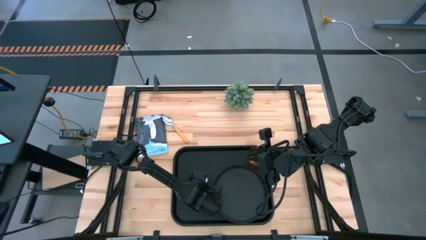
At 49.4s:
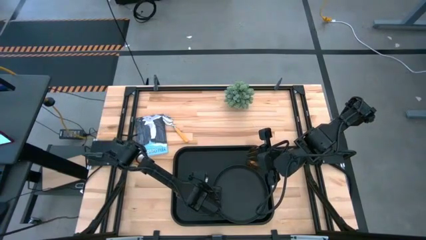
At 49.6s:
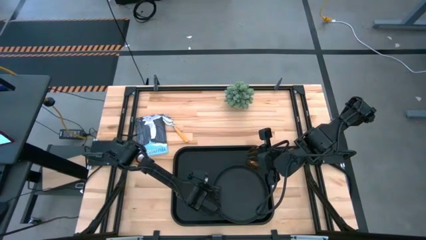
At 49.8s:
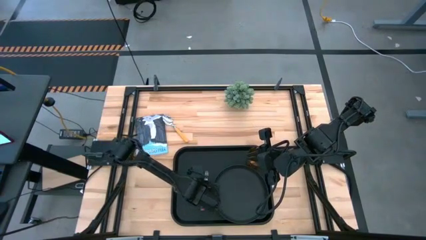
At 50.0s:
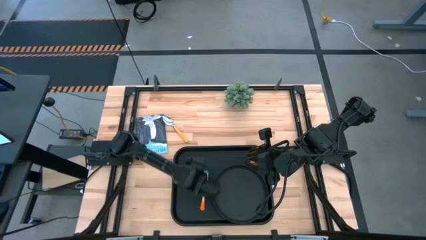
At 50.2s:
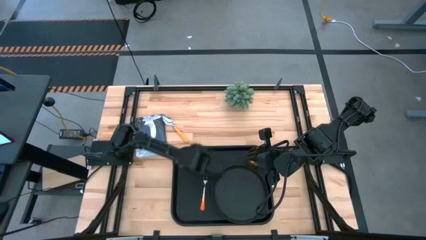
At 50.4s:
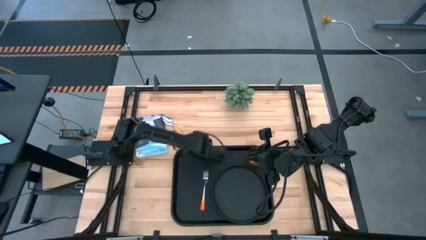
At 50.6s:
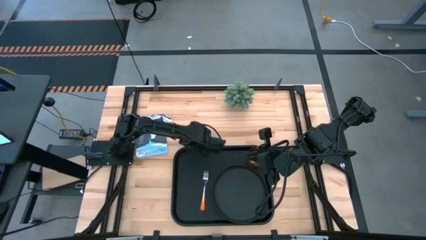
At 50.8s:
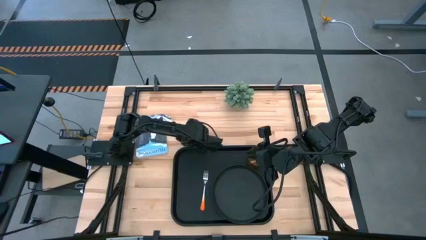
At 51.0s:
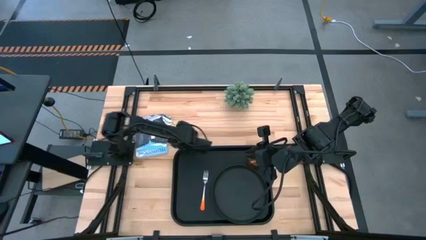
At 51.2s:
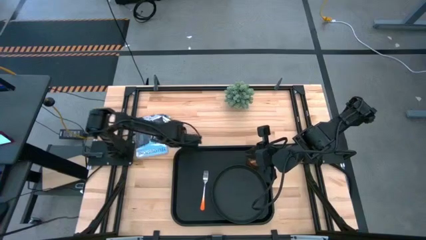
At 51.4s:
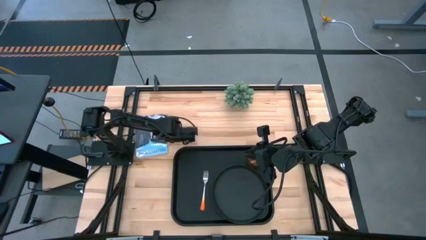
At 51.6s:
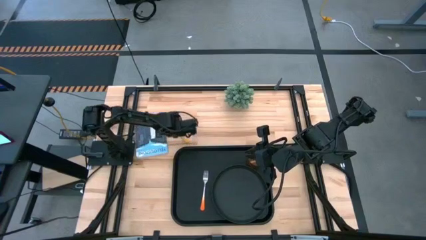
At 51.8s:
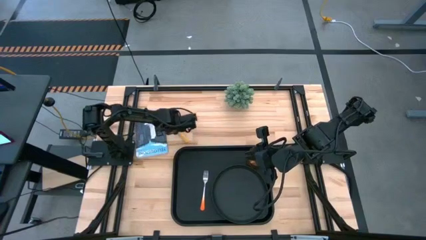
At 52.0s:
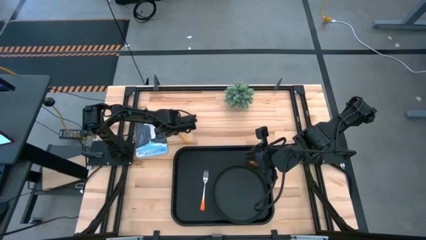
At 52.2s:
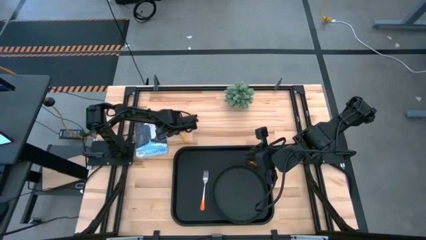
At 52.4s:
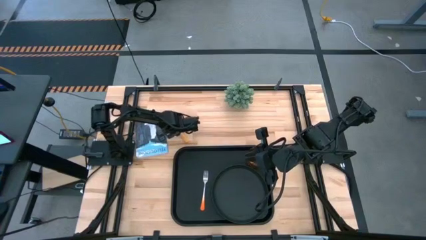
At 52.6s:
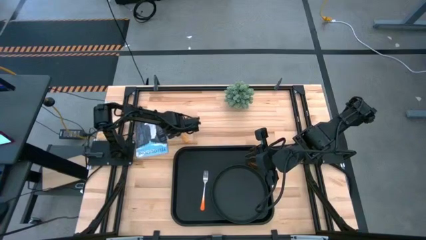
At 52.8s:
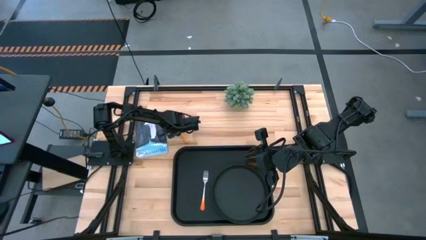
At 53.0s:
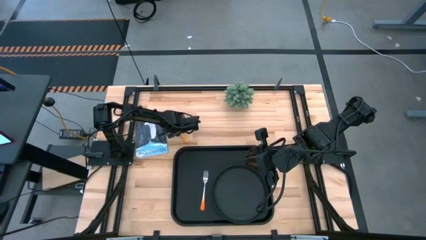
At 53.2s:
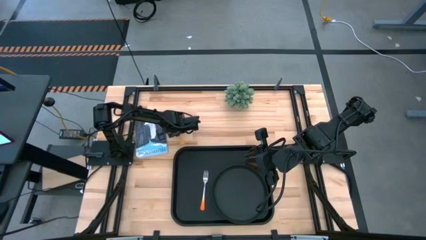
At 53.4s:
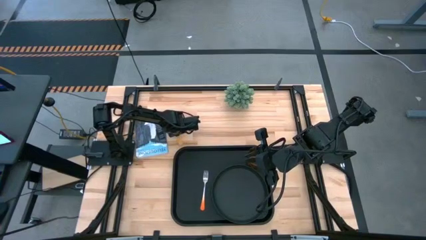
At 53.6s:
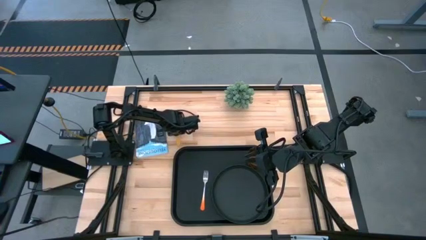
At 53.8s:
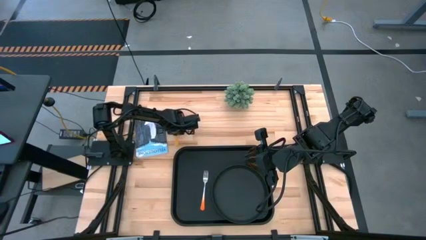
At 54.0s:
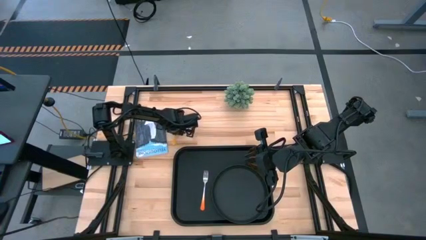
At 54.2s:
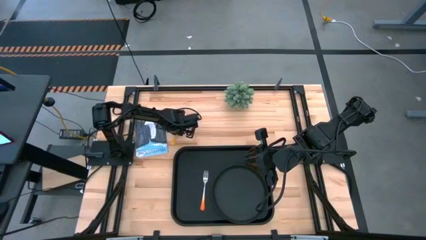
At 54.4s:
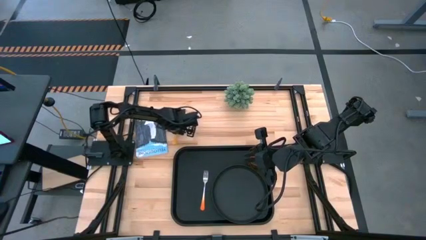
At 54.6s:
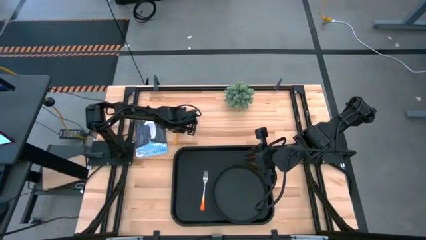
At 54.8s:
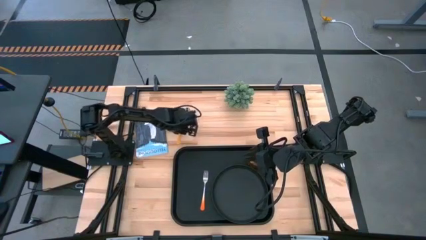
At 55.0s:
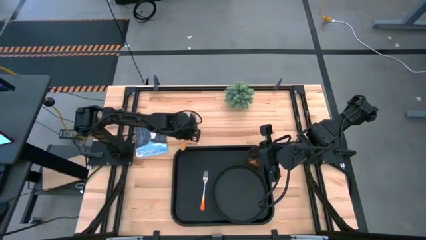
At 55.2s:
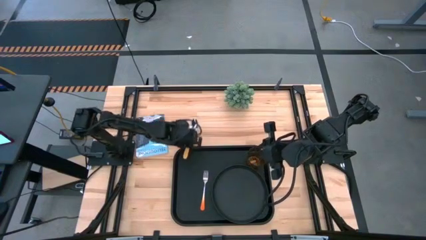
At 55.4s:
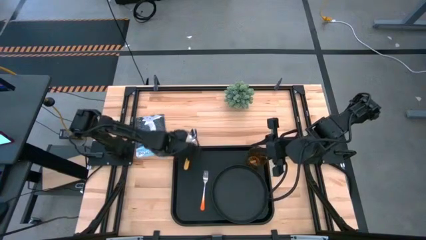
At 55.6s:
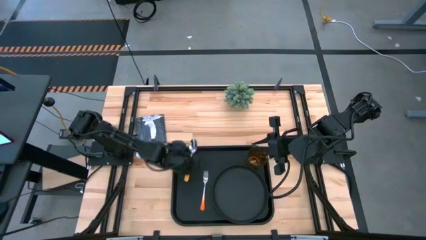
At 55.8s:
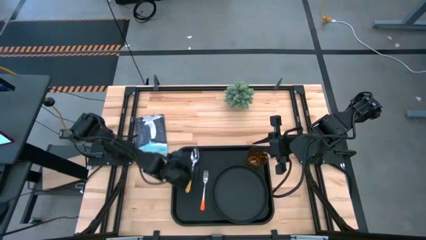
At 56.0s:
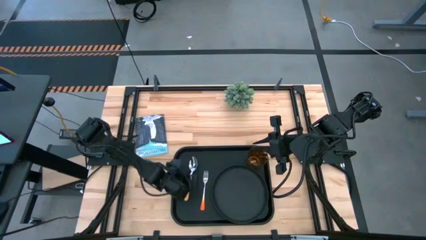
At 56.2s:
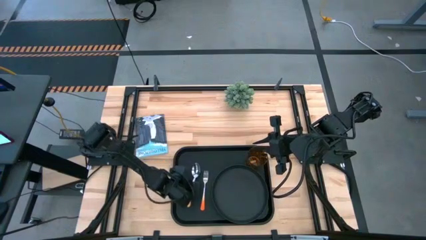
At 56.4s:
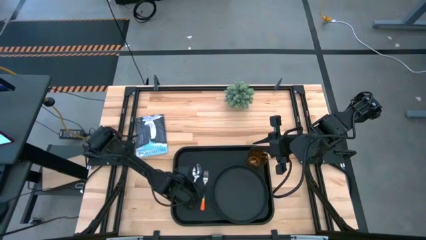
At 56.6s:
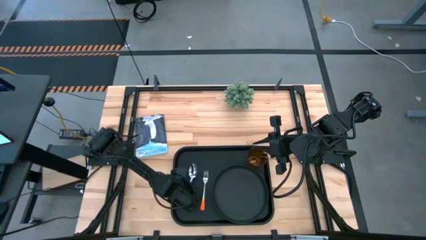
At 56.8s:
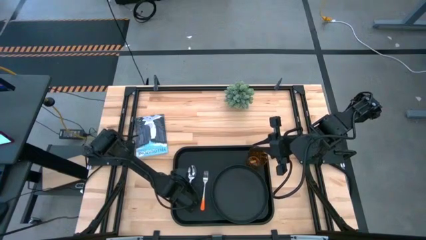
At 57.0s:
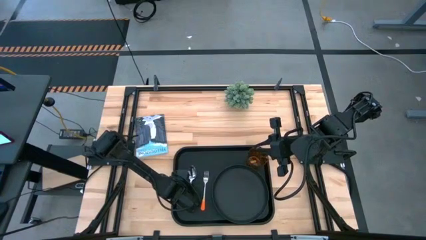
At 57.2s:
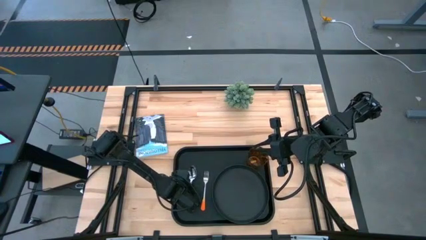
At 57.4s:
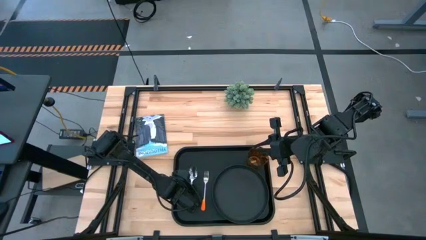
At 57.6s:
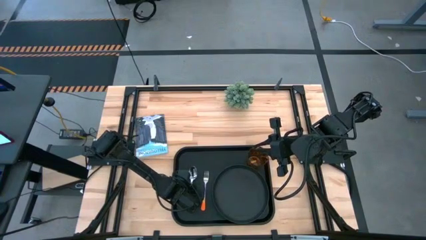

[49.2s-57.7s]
Task: Pick and place plate/cup/fork/spoon on tray
Put the yellow spoon to the left side of the orange fork on the black serving tray

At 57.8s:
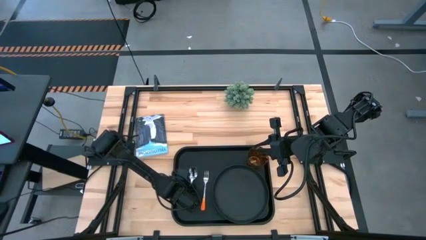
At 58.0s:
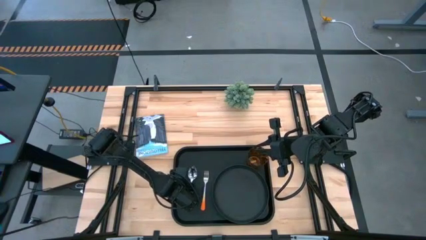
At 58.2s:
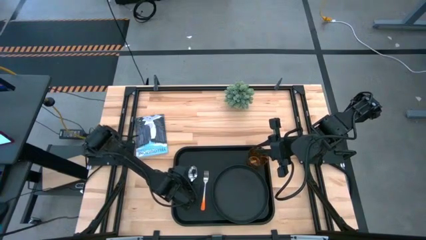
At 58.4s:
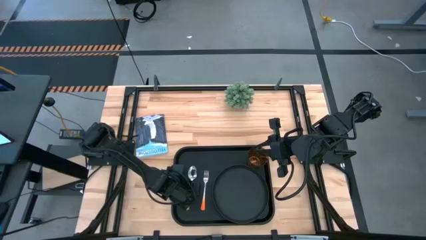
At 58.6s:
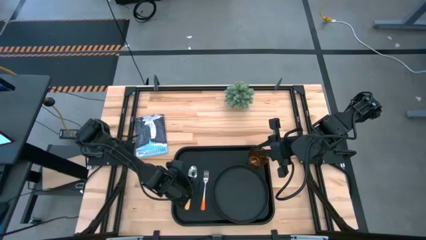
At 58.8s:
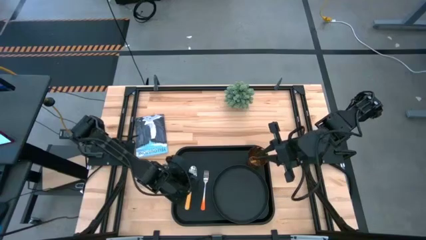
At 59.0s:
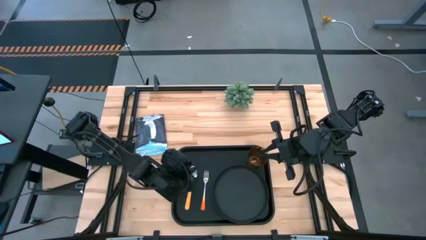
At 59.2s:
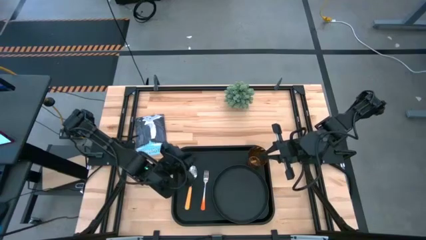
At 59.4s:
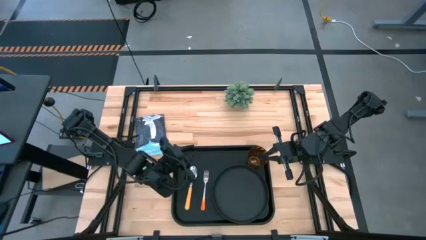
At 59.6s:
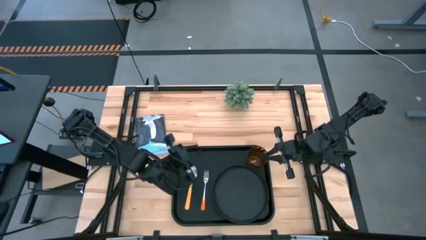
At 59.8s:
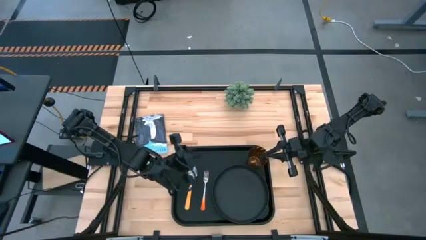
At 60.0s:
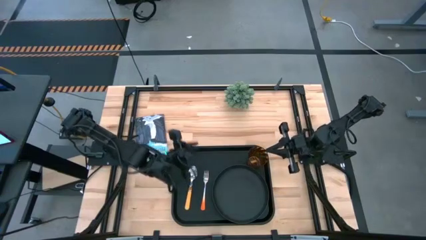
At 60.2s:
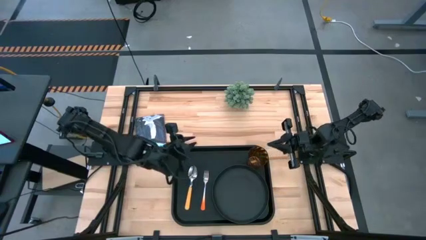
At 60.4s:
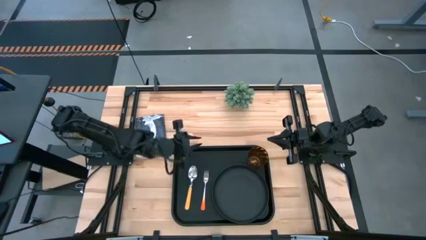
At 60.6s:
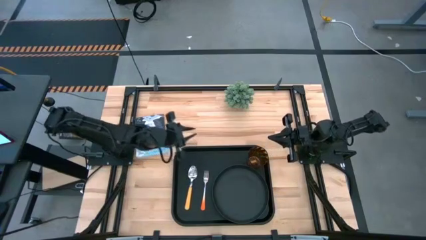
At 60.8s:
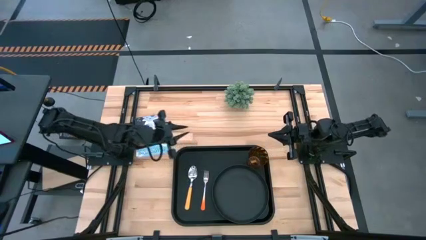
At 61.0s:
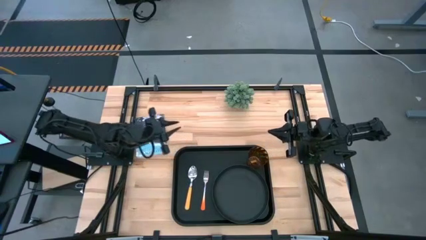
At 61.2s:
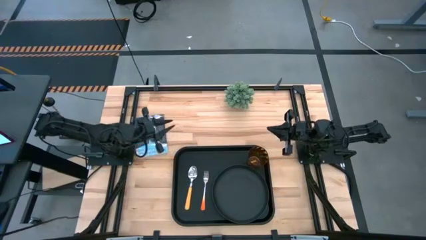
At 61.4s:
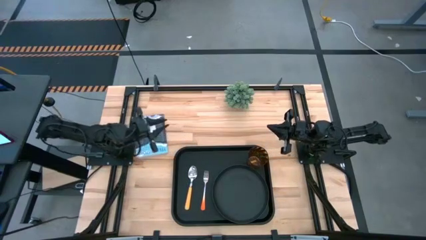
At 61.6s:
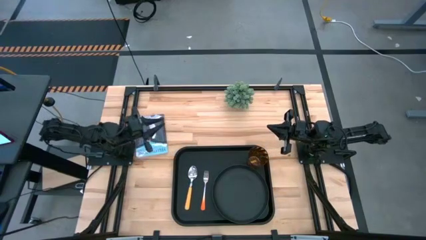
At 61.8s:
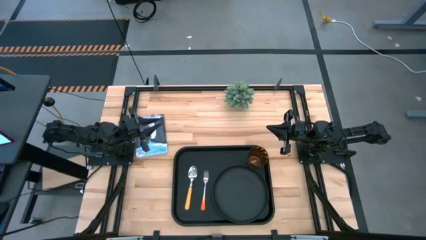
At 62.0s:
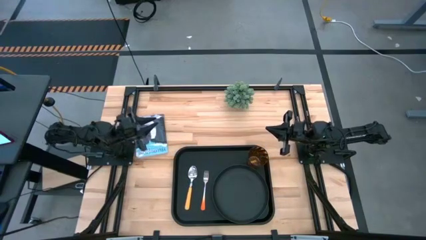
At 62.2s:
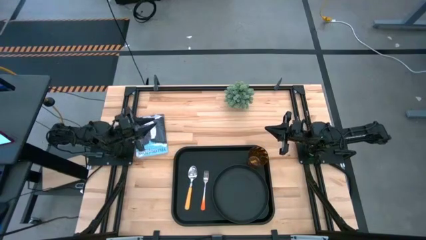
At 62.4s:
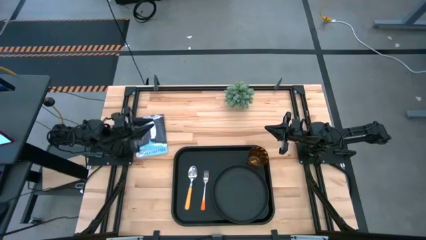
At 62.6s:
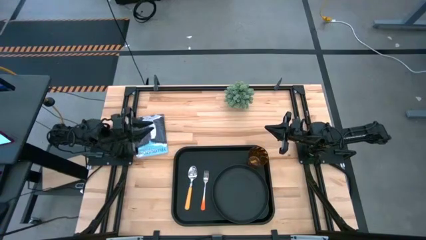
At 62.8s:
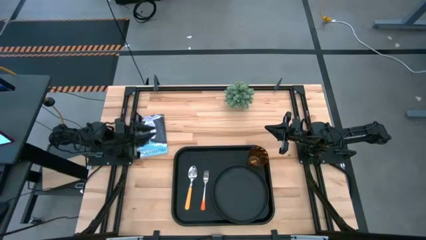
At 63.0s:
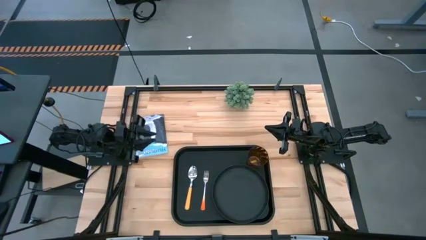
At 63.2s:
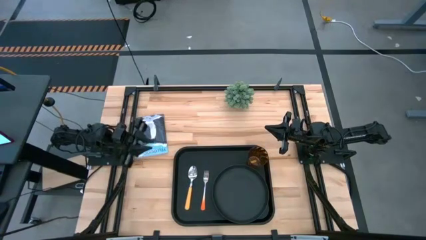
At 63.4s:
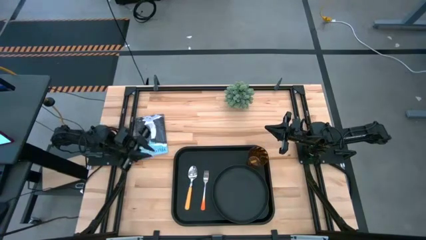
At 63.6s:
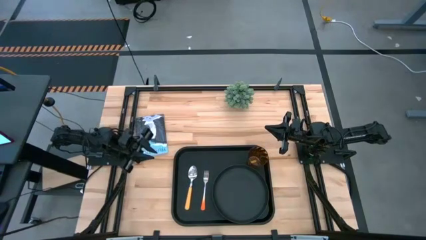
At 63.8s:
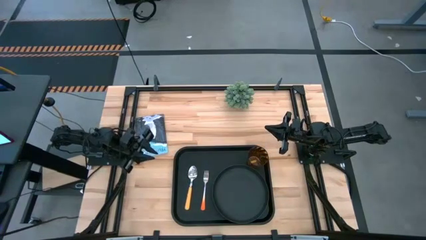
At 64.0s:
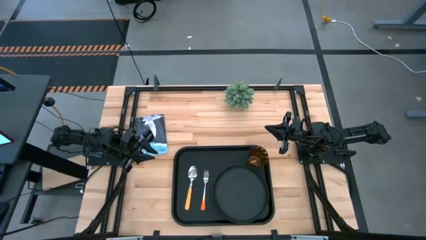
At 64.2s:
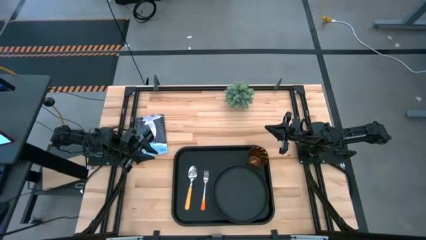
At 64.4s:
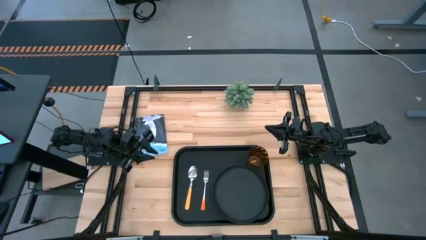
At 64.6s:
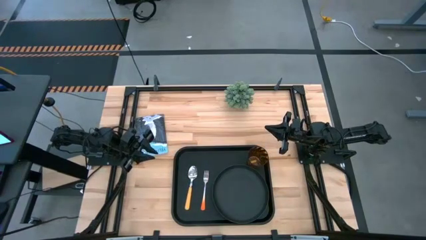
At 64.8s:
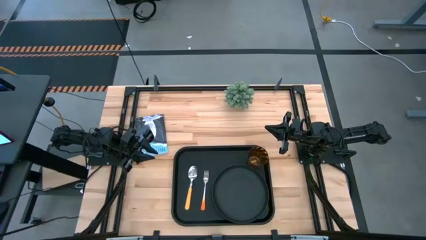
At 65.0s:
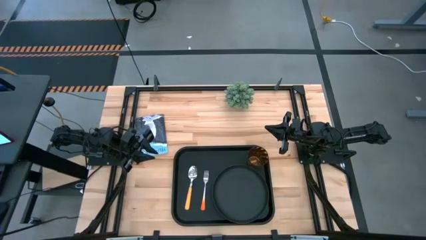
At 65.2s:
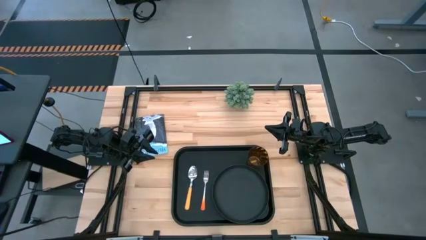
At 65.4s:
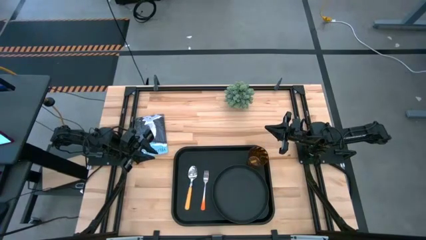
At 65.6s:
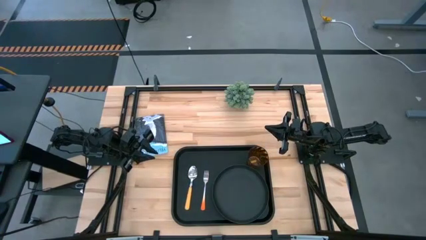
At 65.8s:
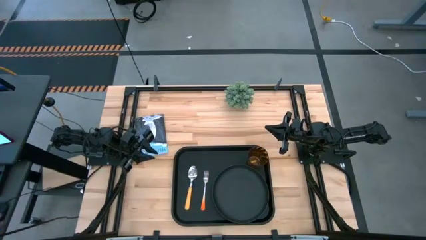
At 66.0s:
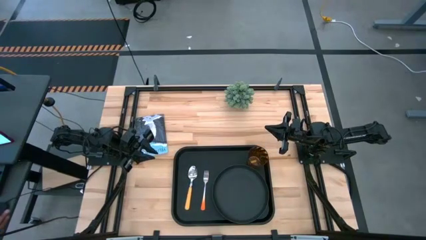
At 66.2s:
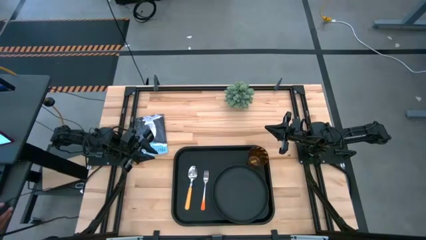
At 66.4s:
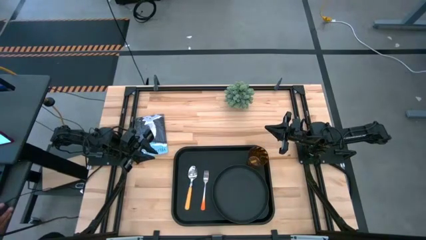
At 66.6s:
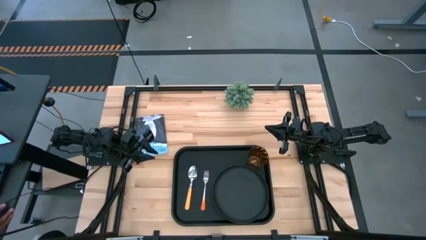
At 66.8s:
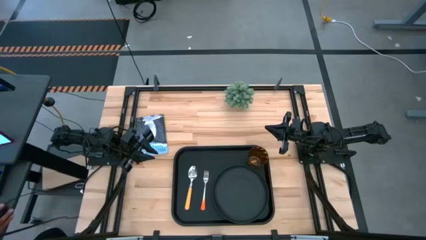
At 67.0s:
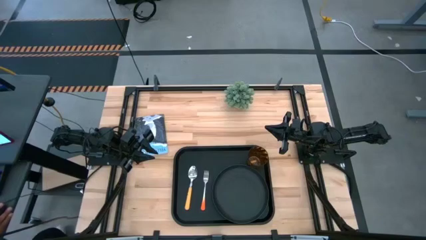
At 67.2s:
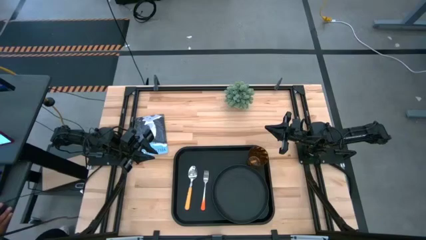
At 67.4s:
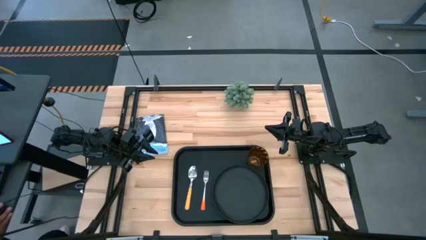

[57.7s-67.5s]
Return to Home Position
